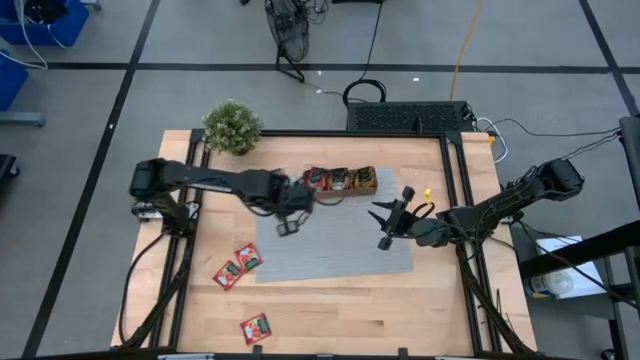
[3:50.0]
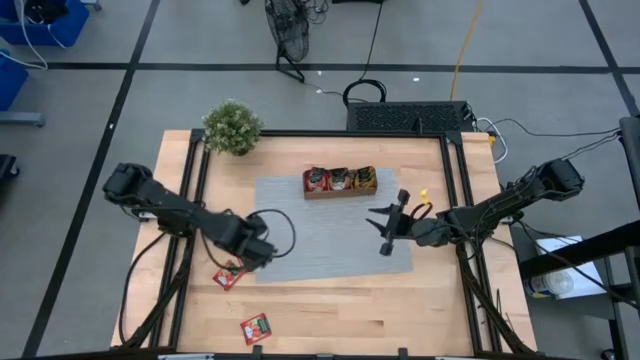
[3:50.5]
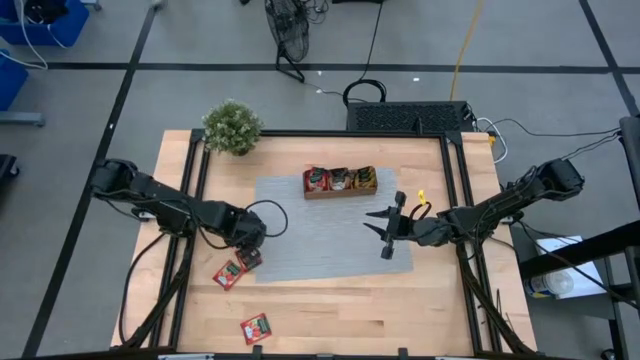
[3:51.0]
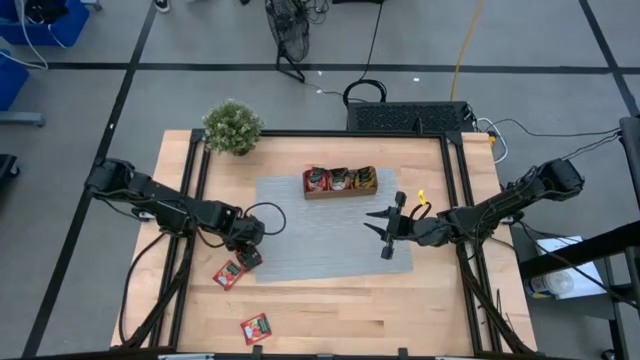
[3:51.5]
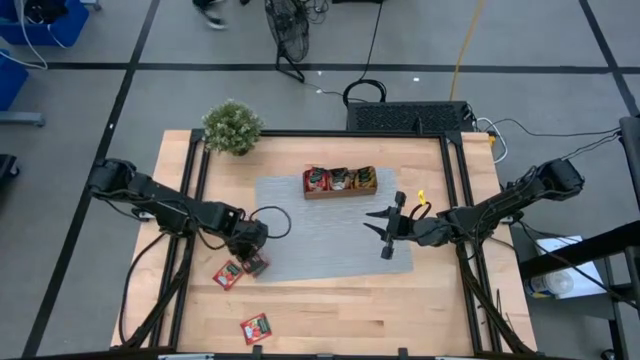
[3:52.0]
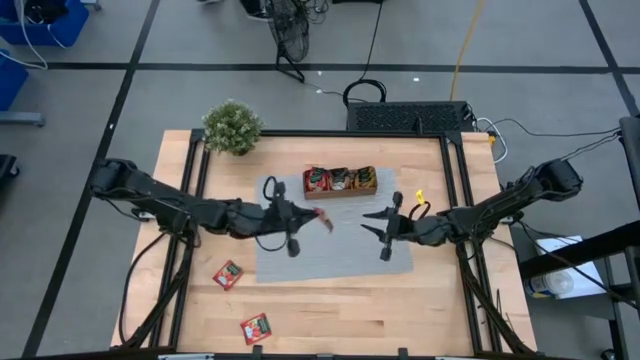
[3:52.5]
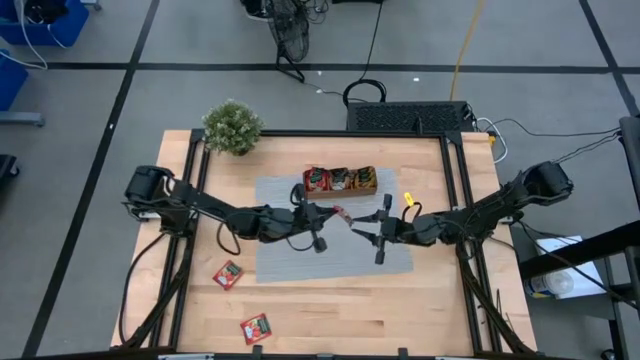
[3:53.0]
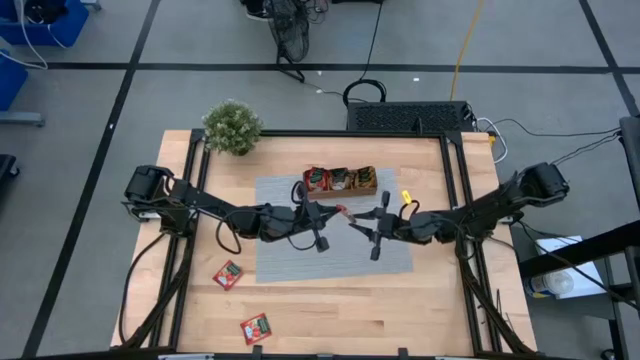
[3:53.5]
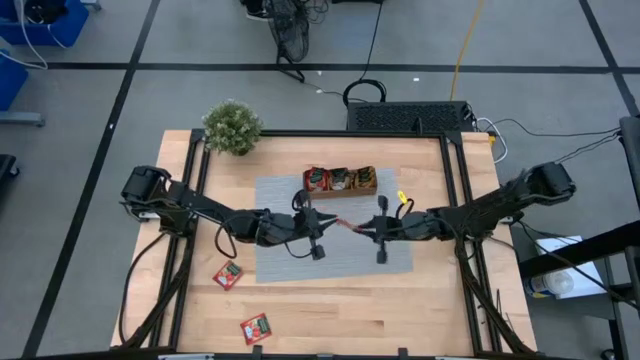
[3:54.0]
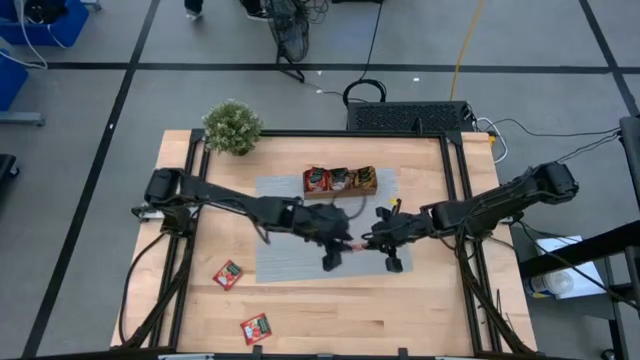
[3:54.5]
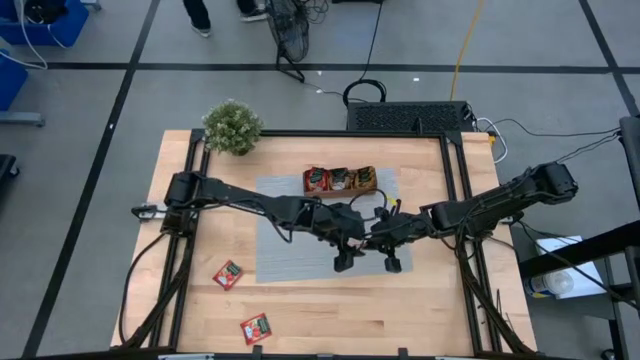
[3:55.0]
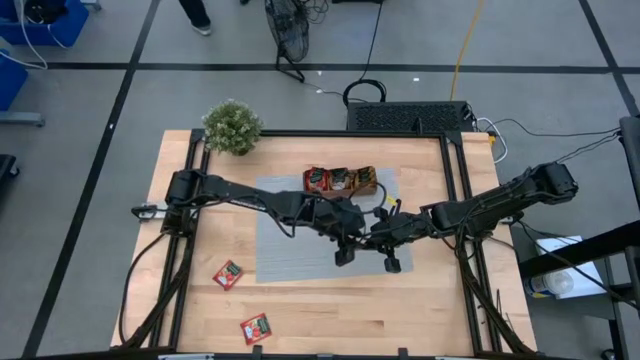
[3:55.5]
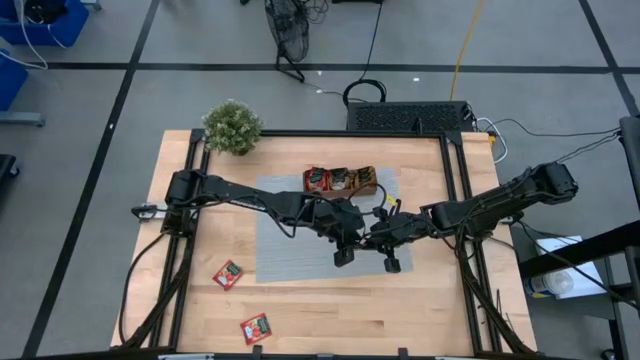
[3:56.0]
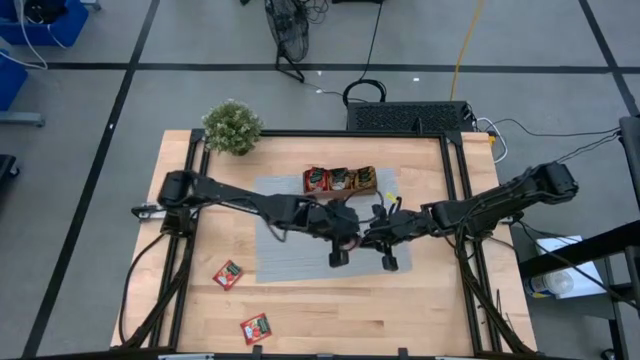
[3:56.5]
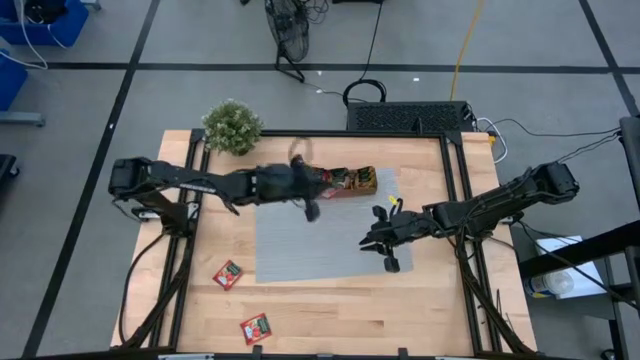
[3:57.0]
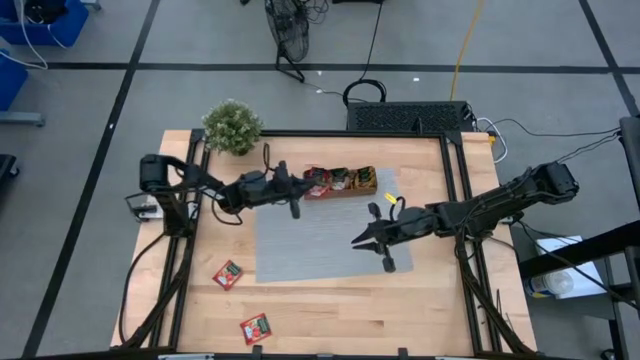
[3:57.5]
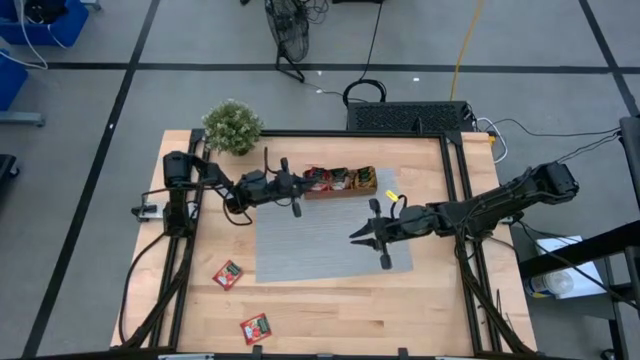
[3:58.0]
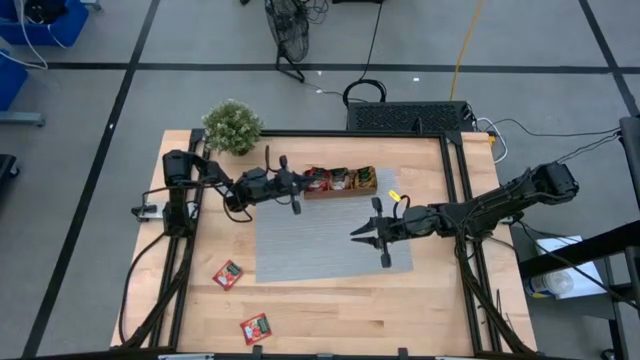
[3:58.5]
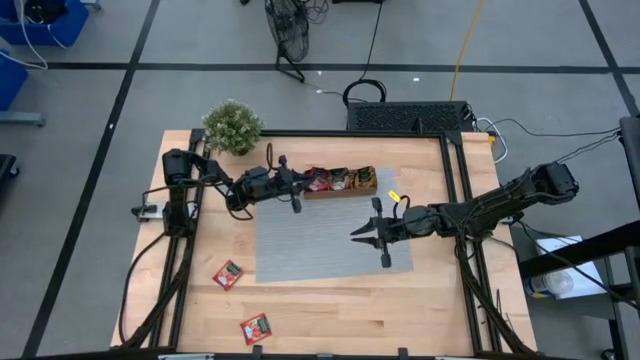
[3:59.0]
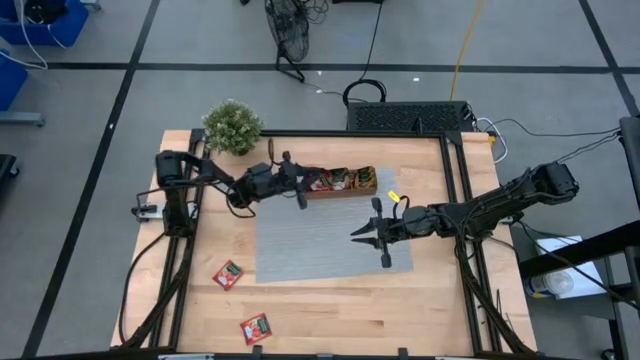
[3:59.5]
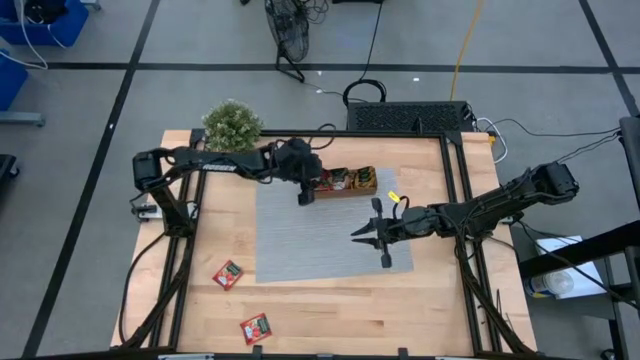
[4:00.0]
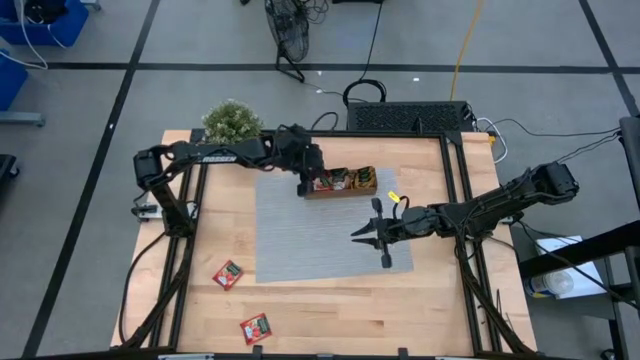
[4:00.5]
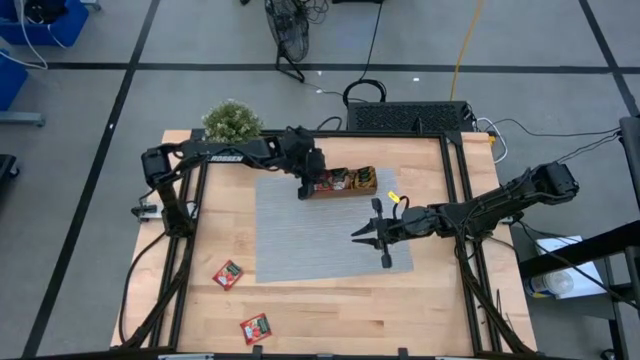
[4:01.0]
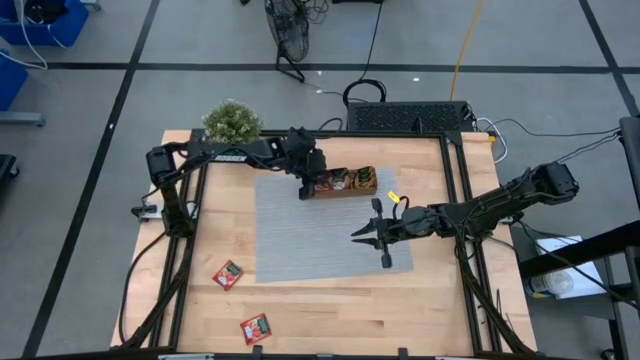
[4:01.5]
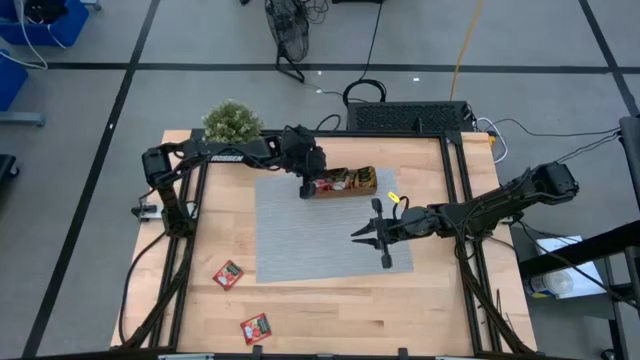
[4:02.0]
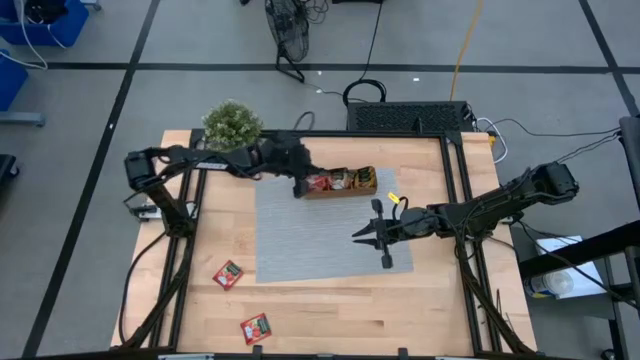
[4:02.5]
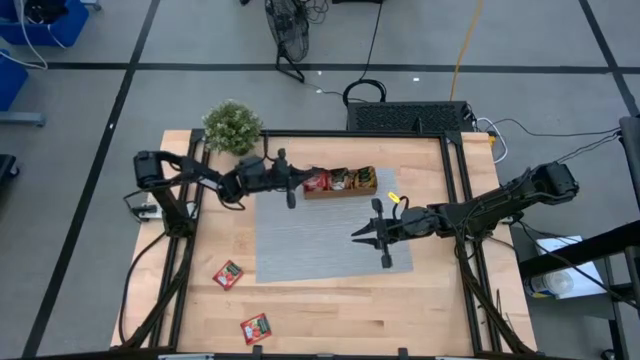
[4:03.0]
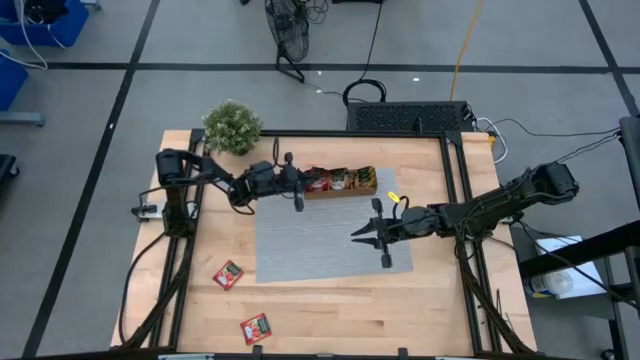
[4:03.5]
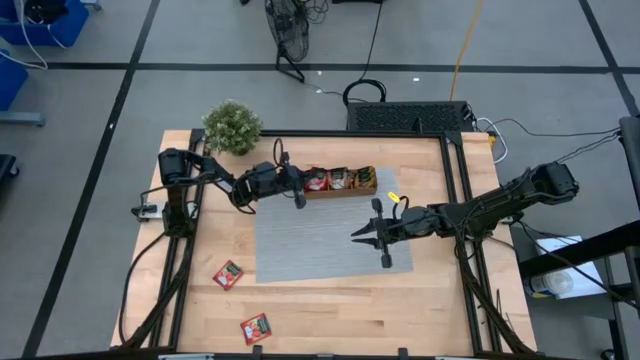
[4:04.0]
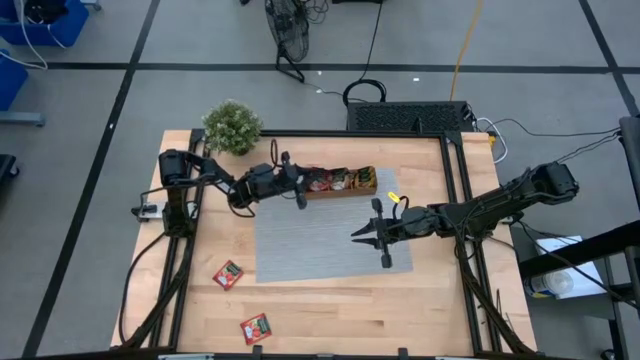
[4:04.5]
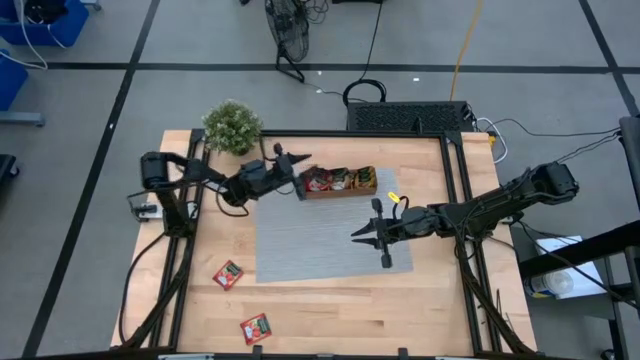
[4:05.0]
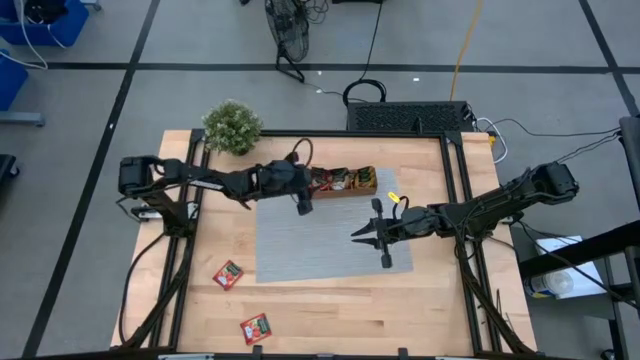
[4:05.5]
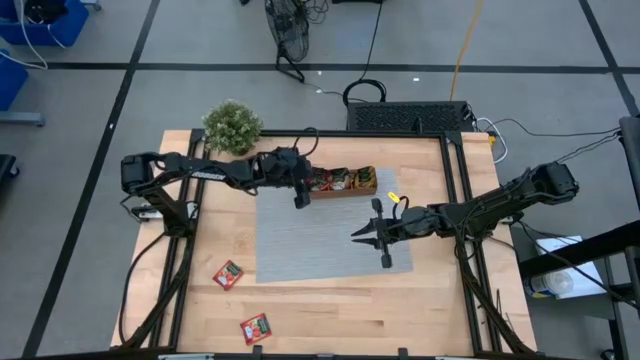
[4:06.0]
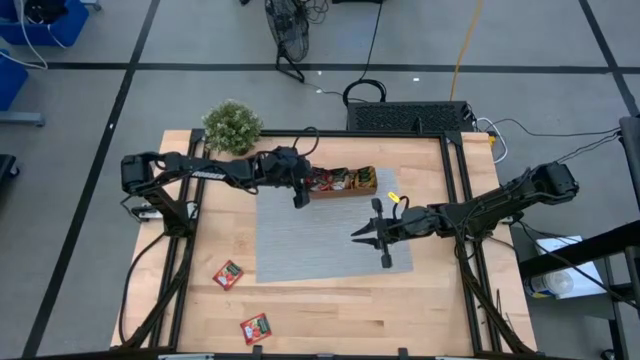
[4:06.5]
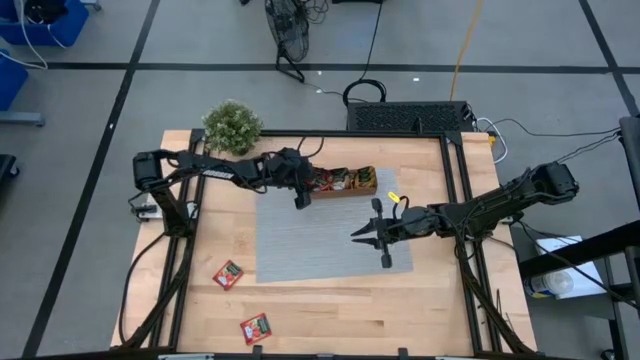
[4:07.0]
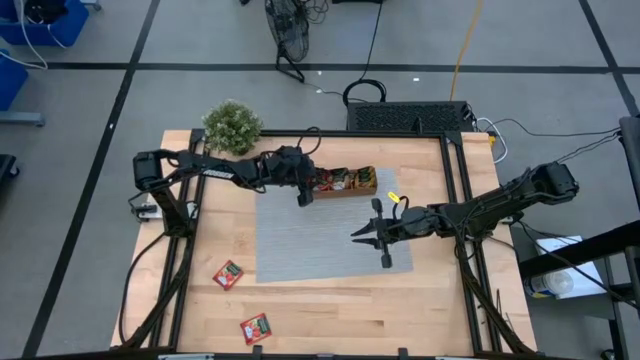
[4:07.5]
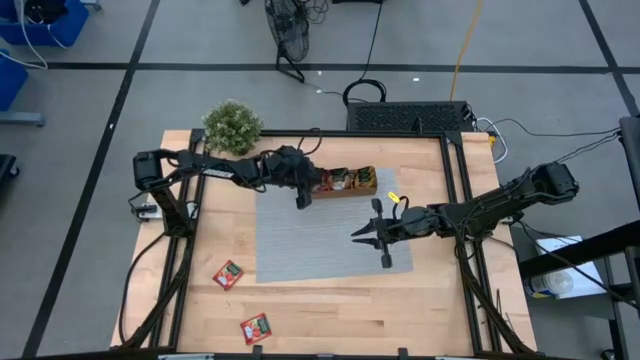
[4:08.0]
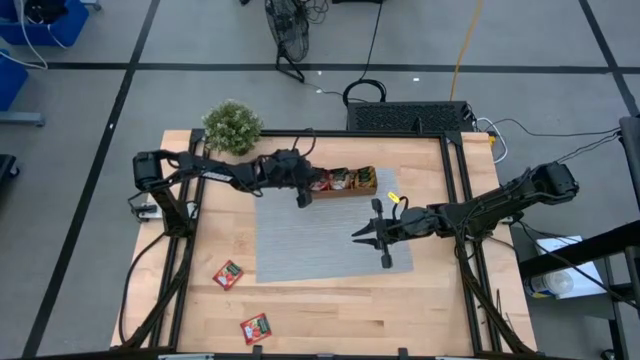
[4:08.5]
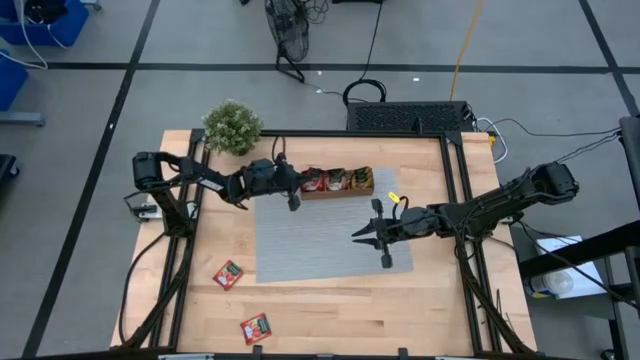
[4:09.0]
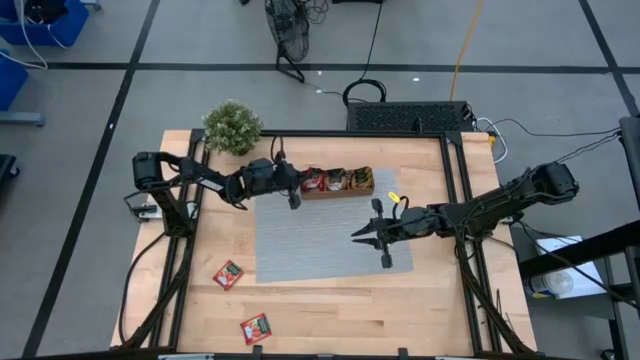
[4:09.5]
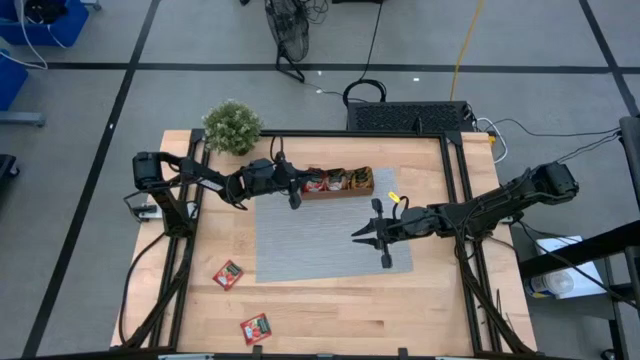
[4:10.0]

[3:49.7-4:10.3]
Task: Pick & Place Tea
Put the red tea bag into the left section of the wooden organizer
